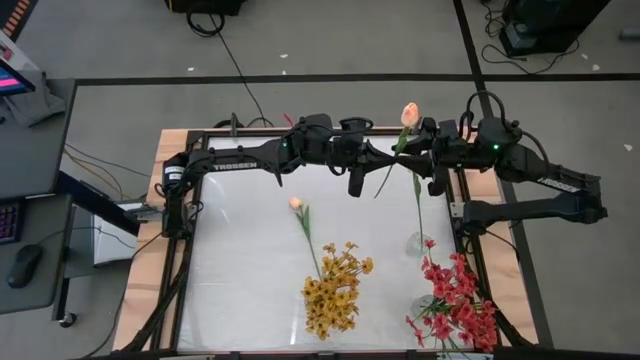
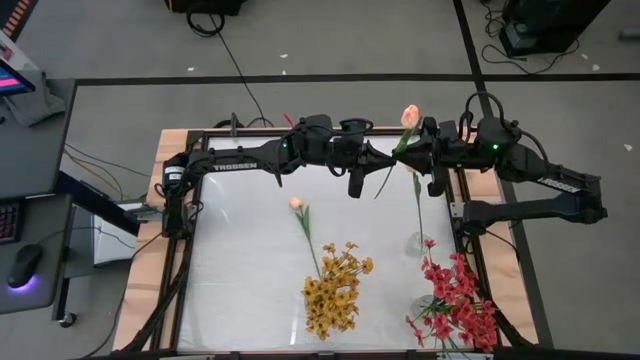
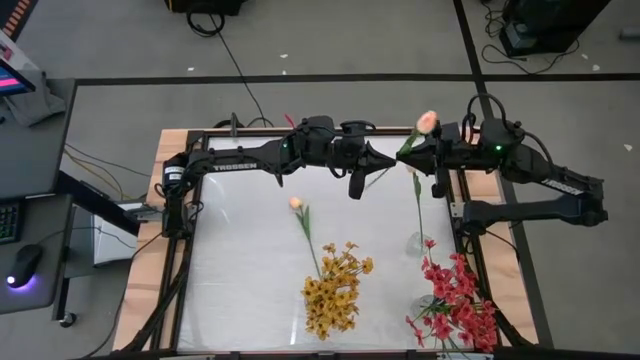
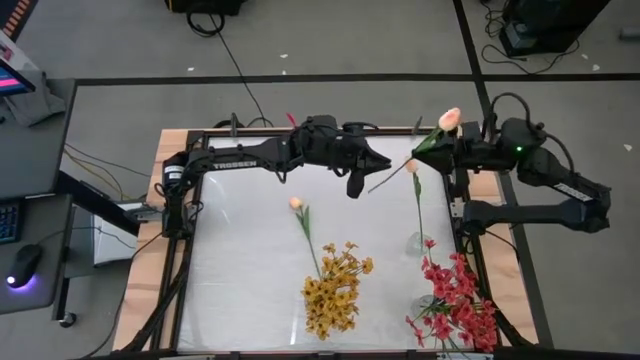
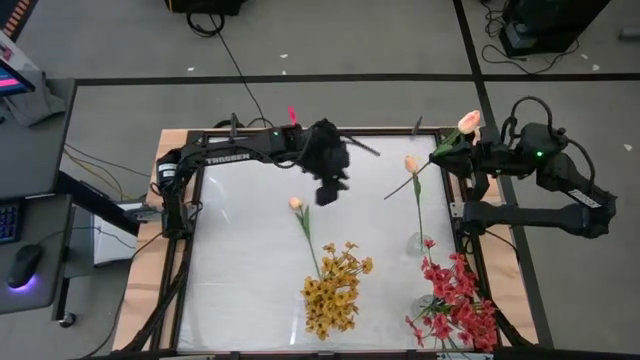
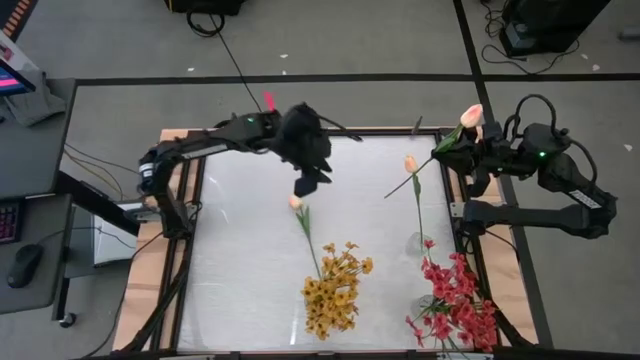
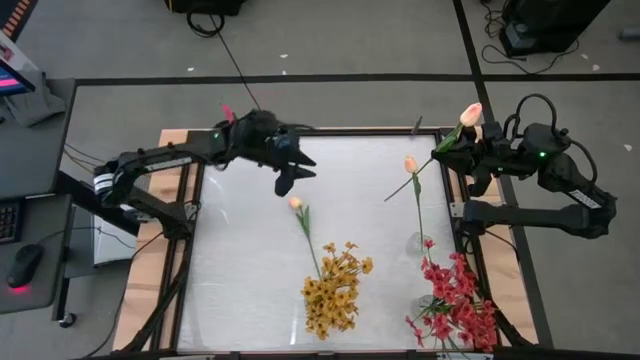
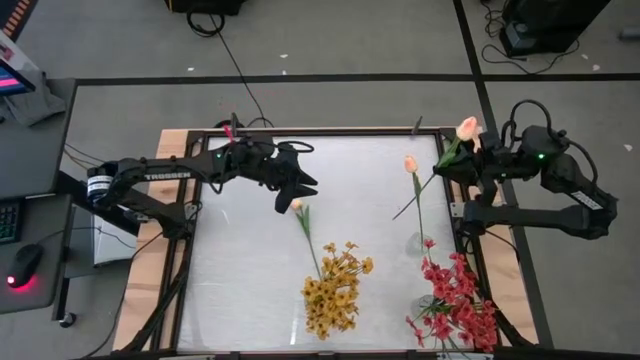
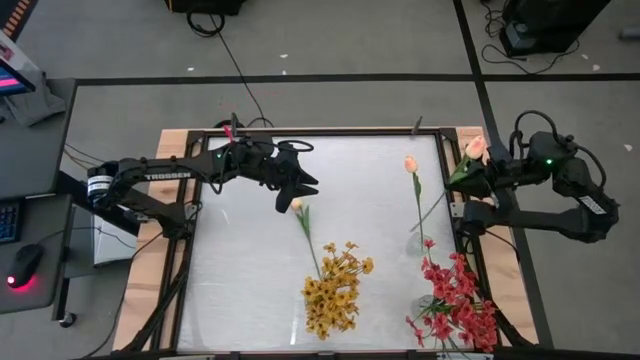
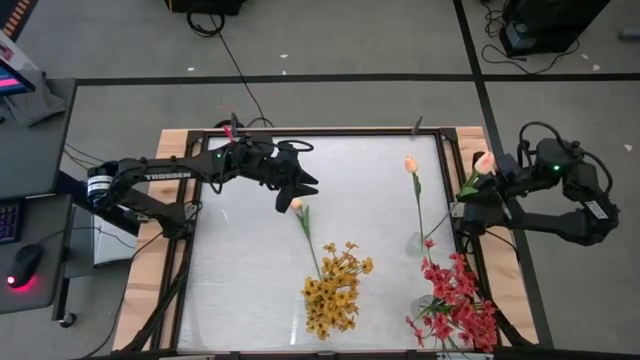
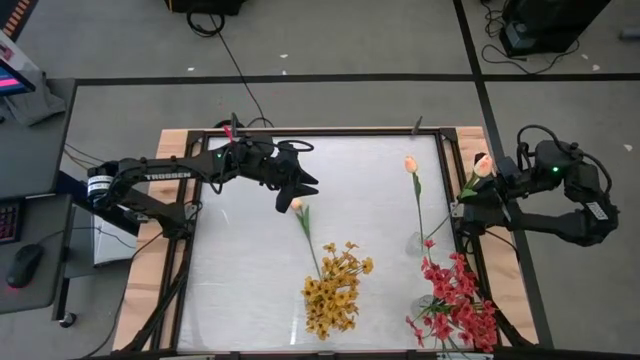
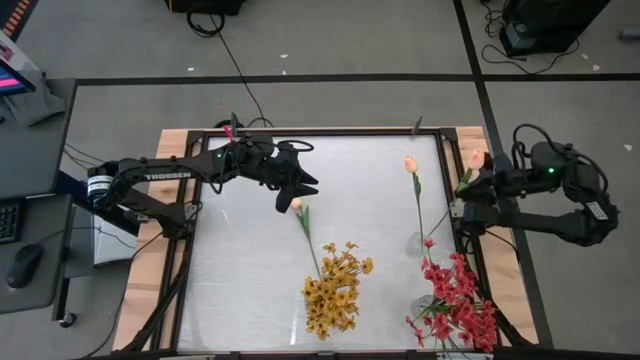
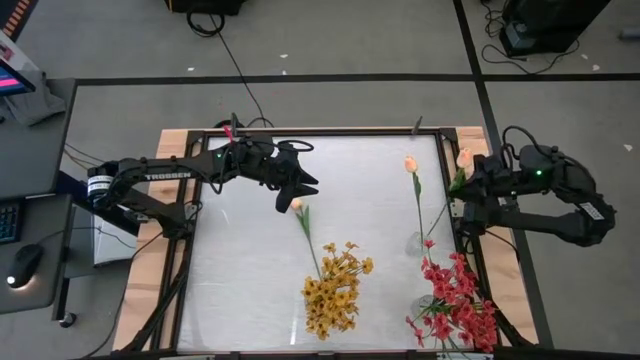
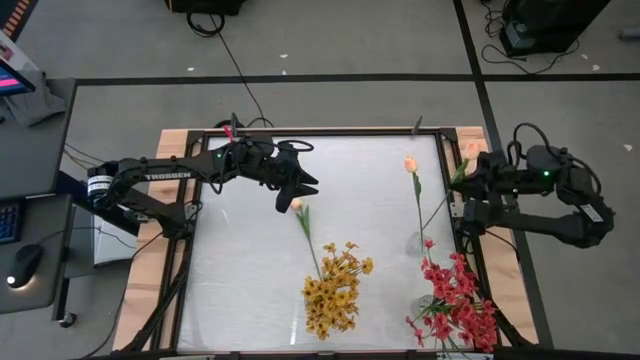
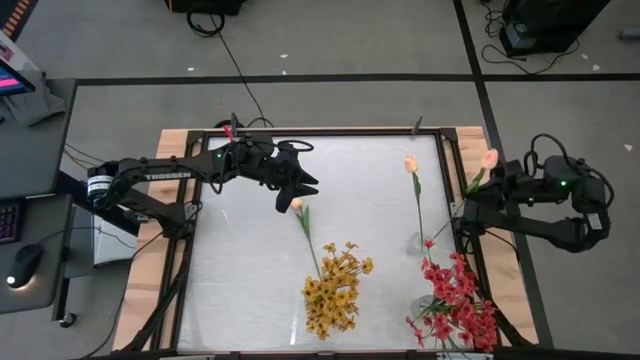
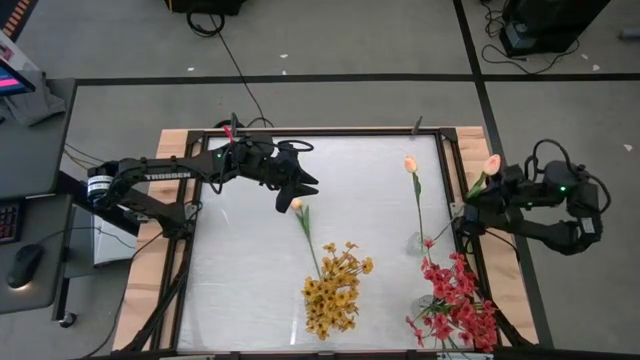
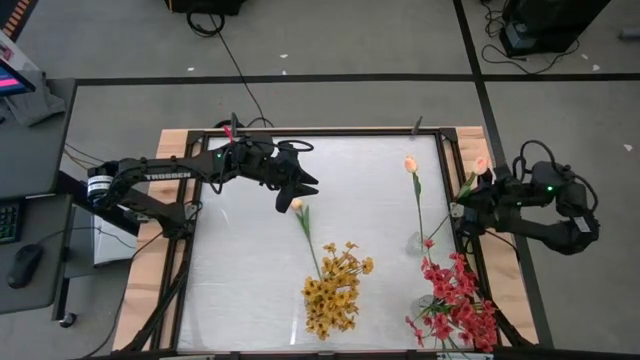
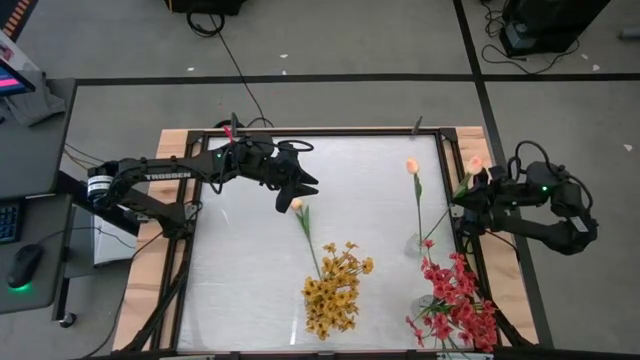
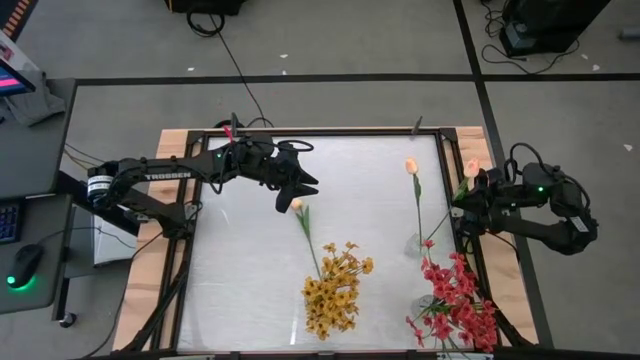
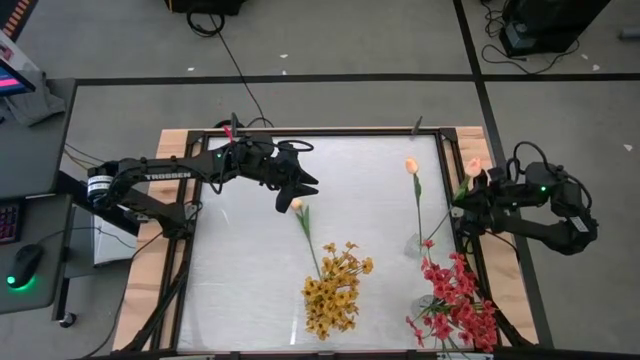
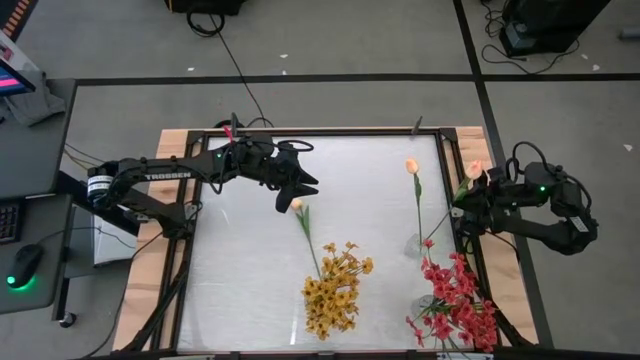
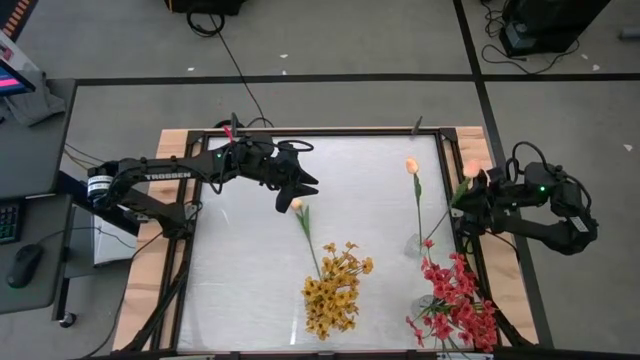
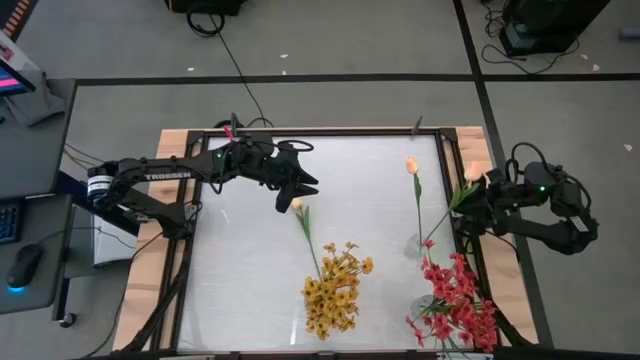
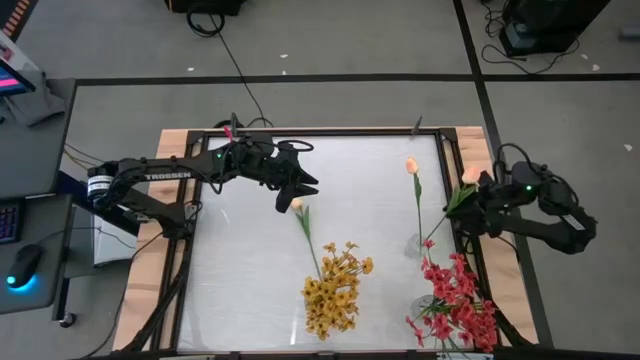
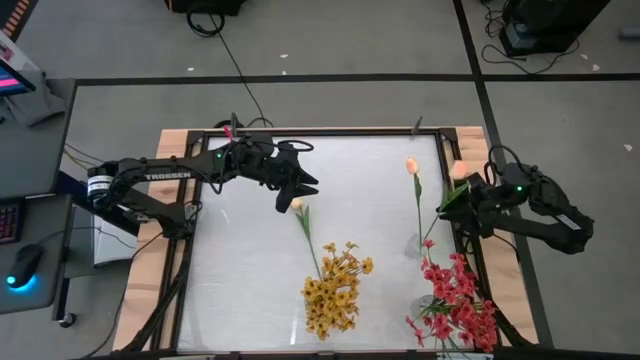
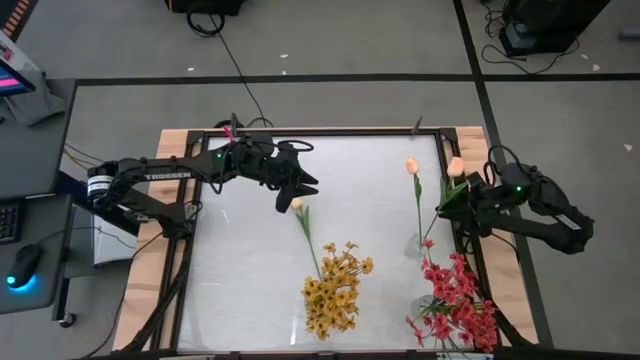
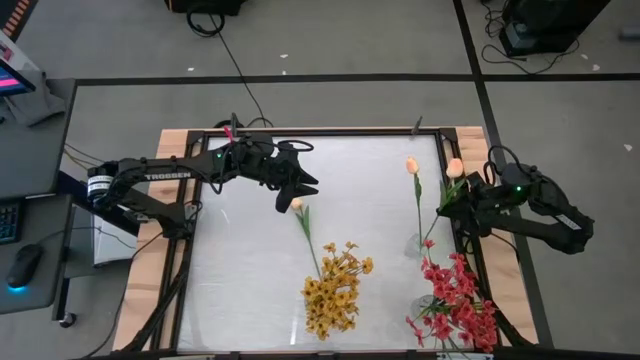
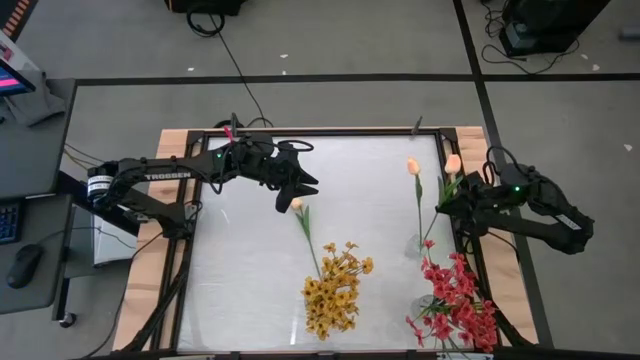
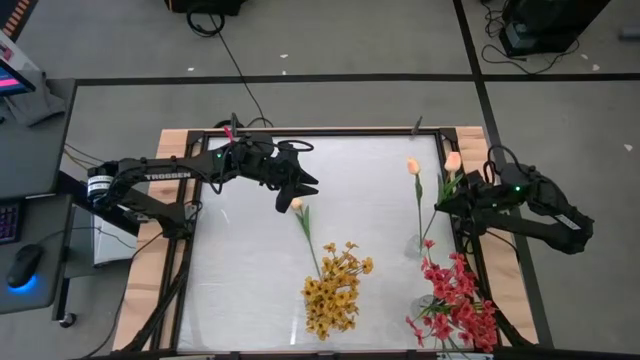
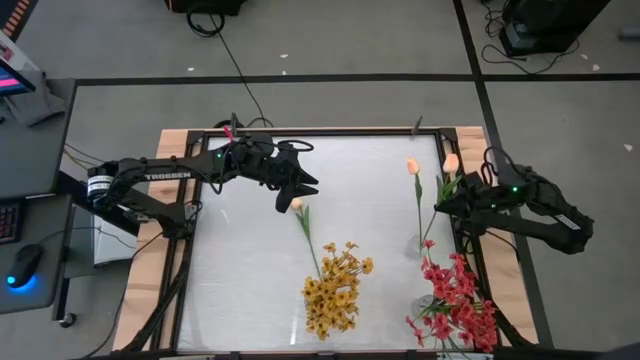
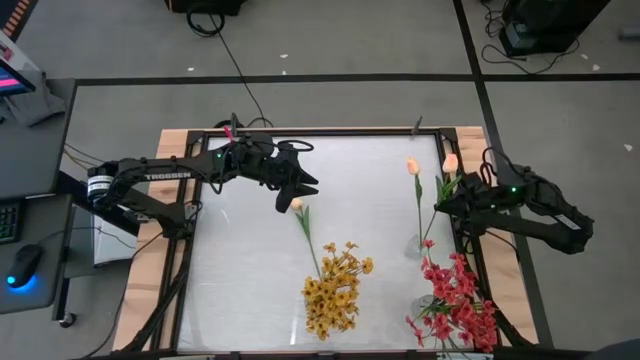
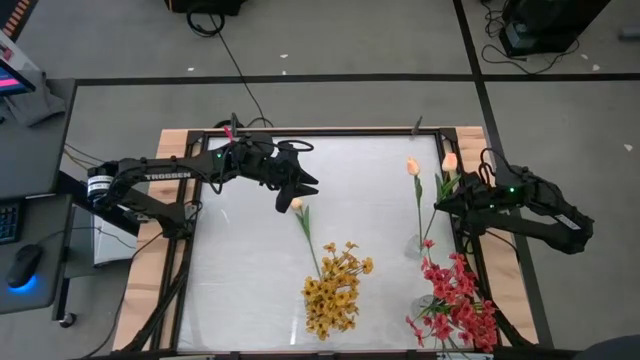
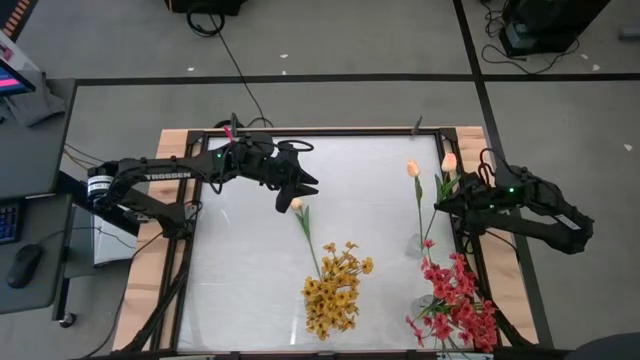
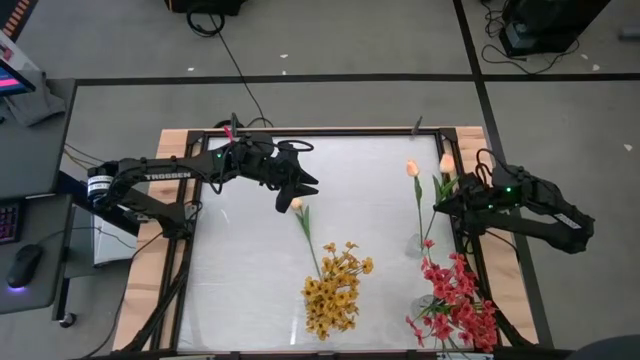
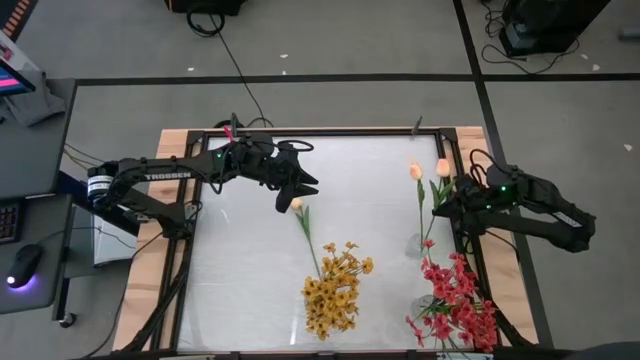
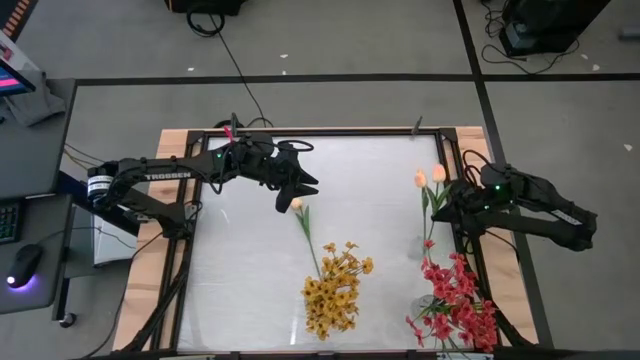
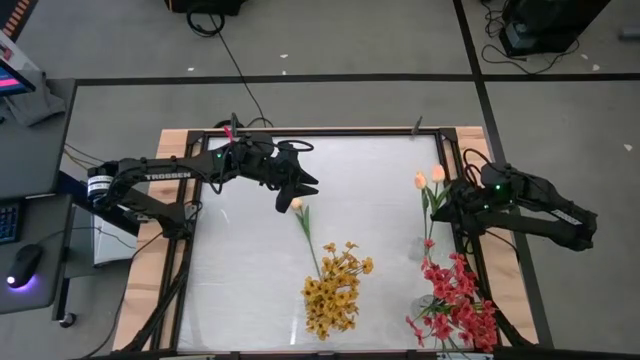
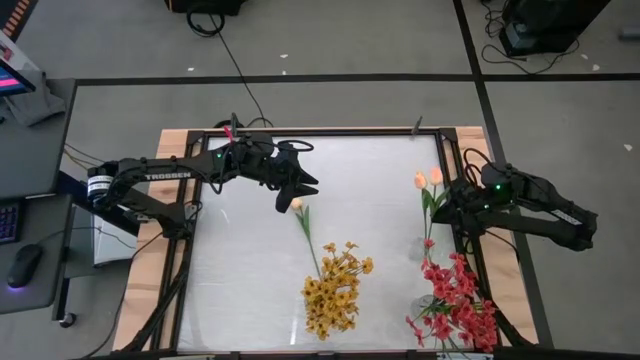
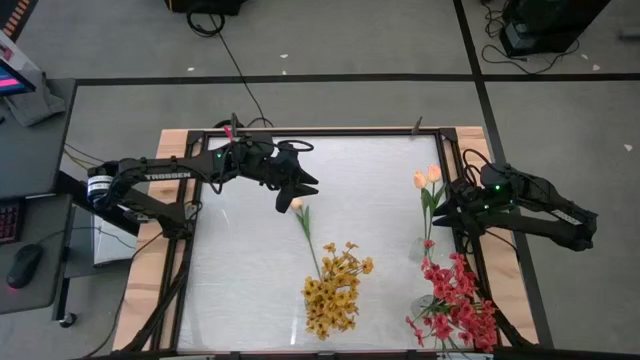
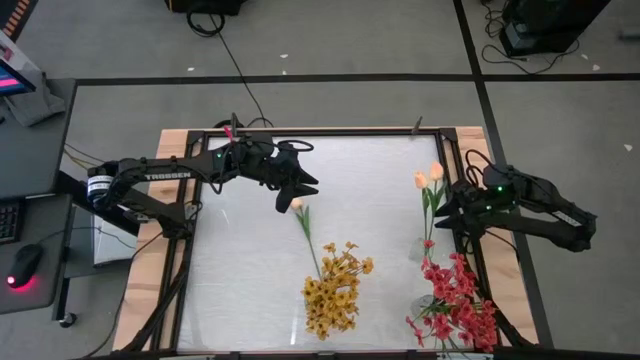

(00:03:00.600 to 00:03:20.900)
Task: Sort flowers into vase by color
Put the top light pink flower into the top transparent vase

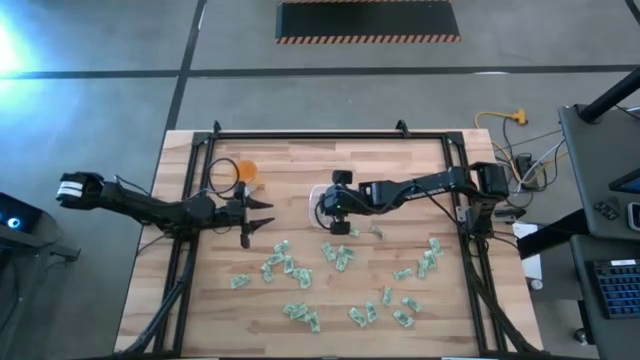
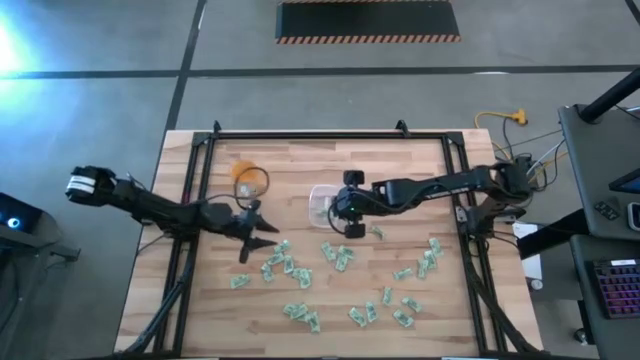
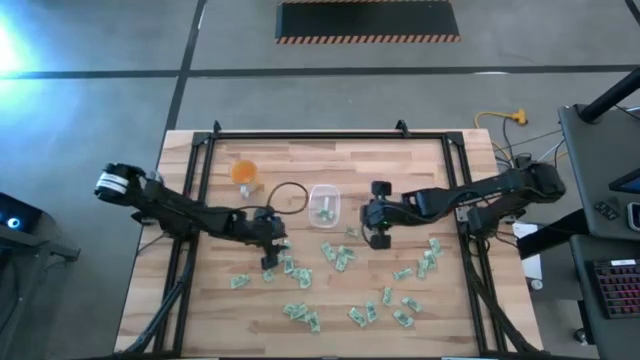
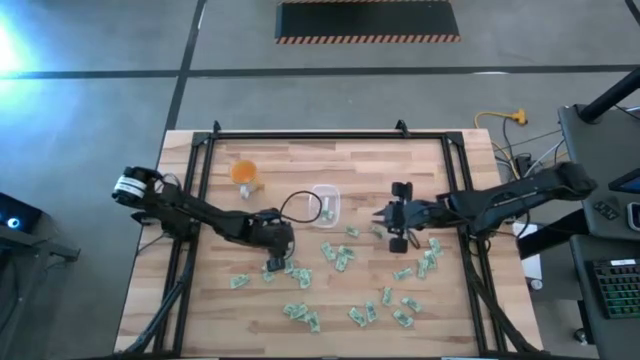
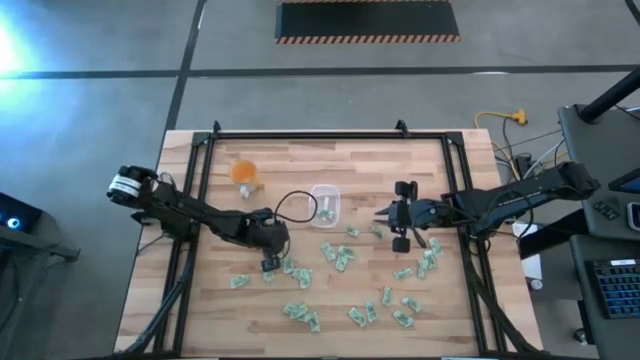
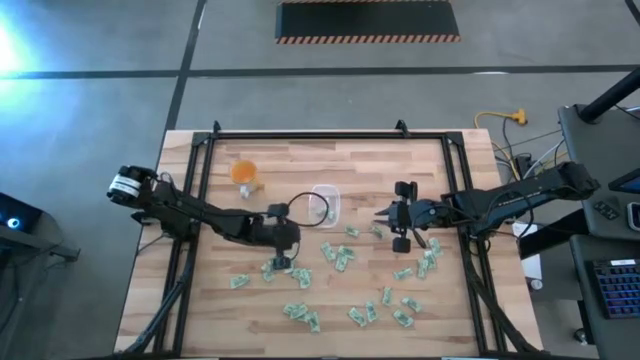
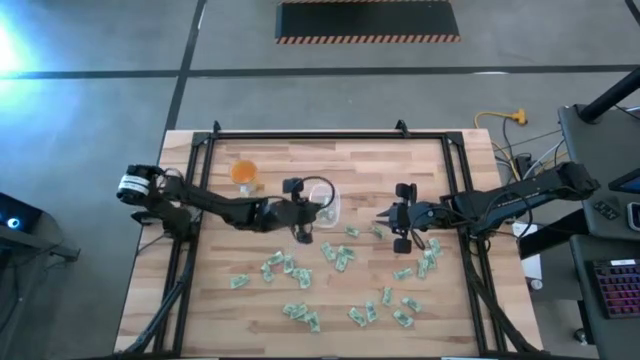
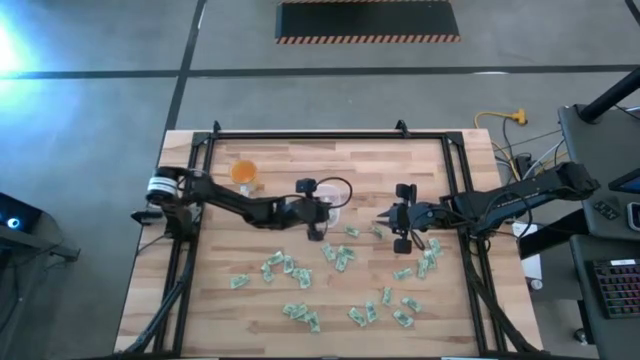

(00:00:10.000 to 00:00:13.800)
Task: Pick and place Stevia / Truvia into bins
Put the stevia packet into the bin
